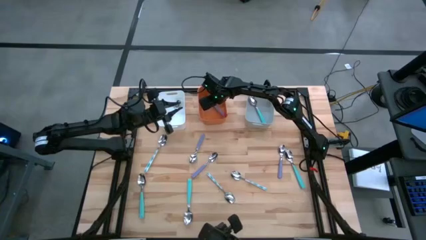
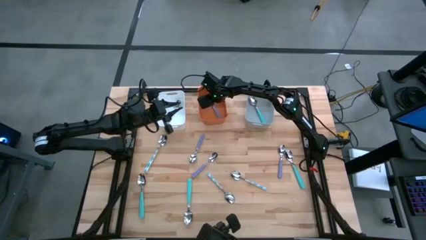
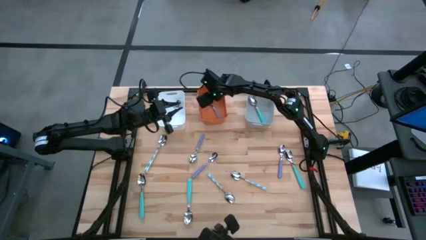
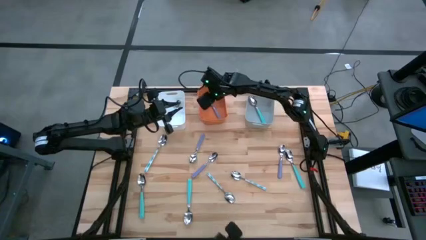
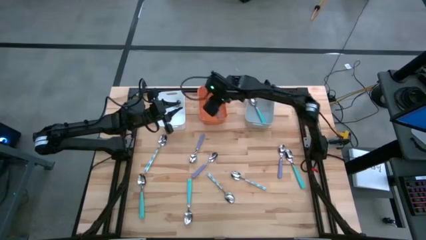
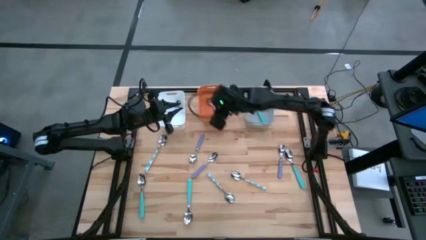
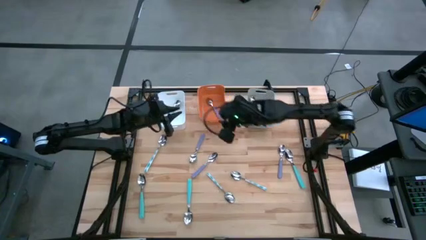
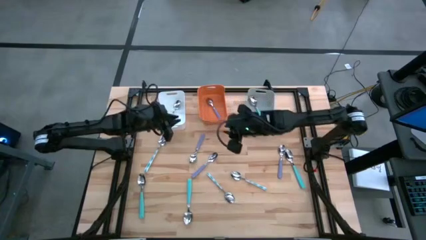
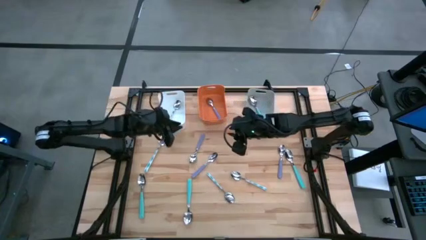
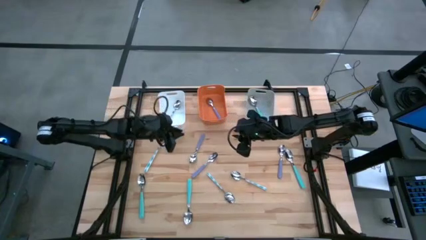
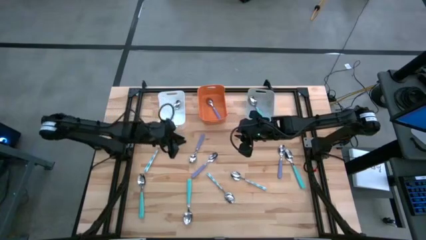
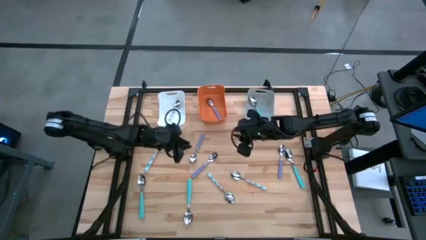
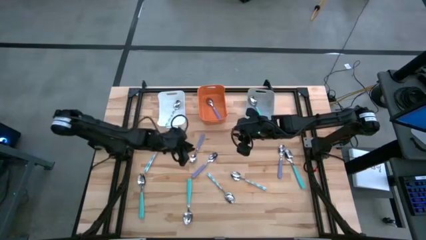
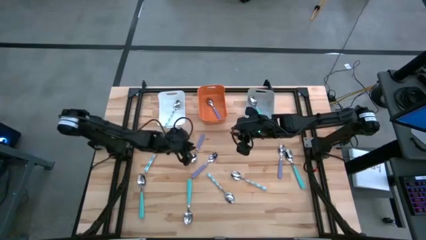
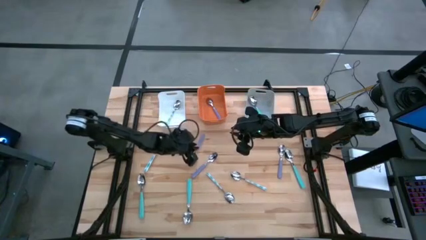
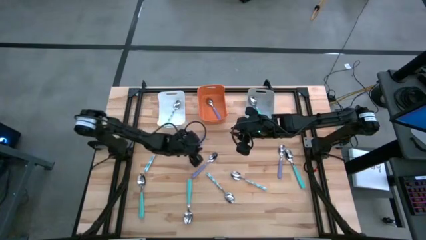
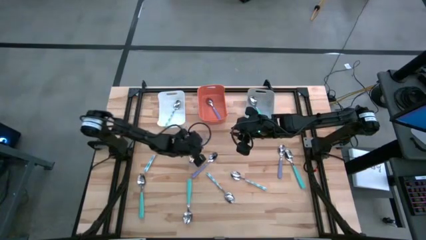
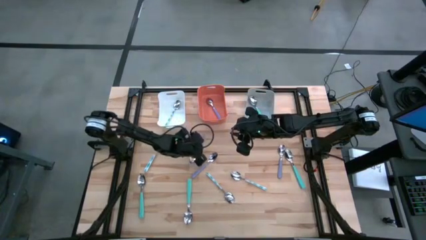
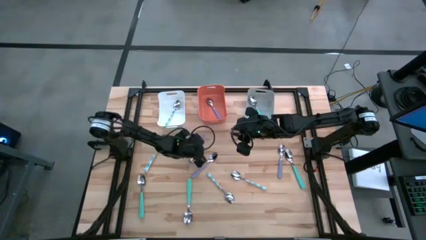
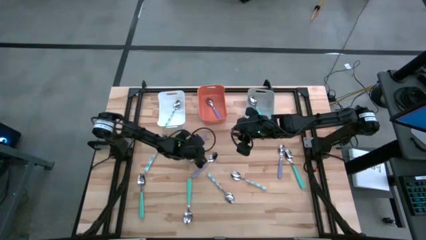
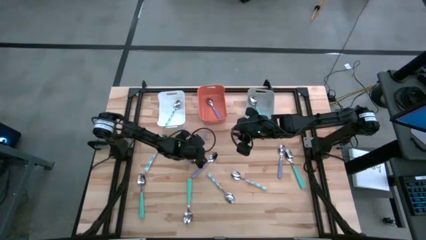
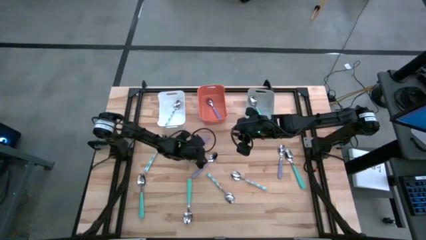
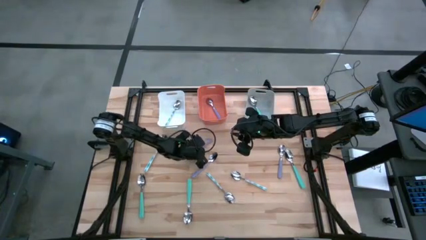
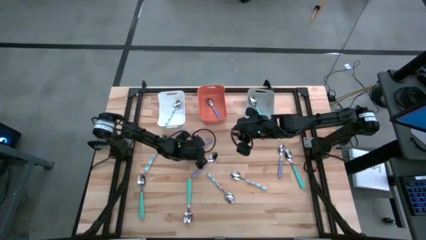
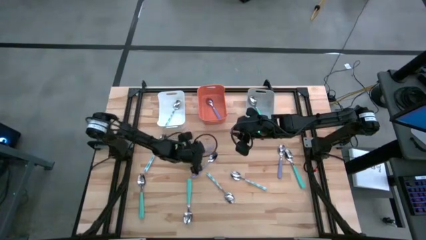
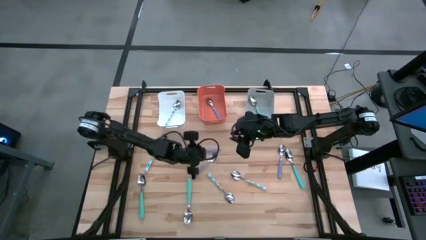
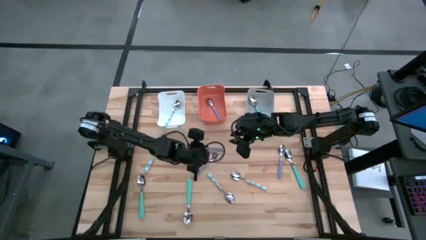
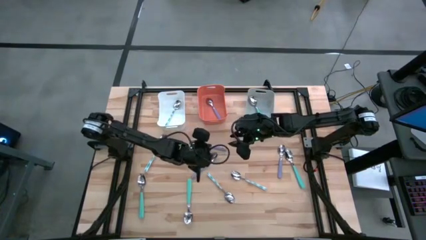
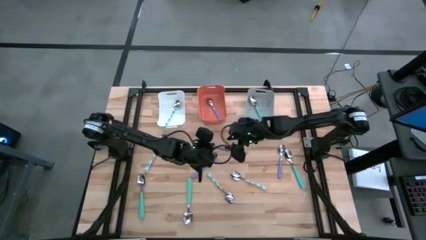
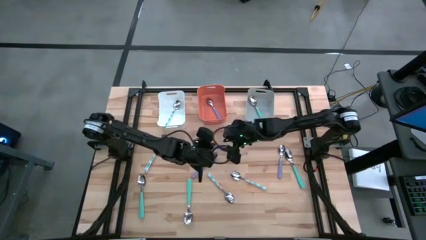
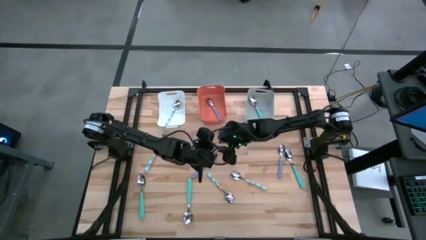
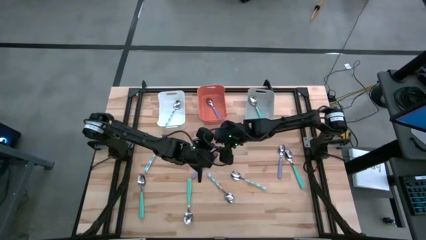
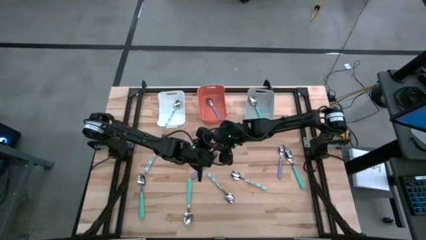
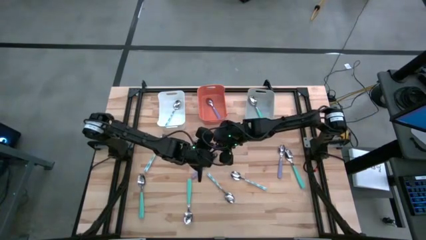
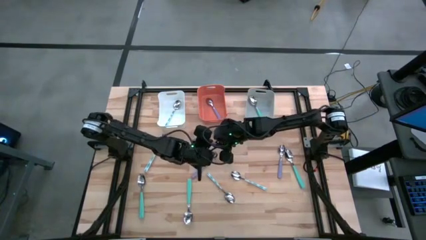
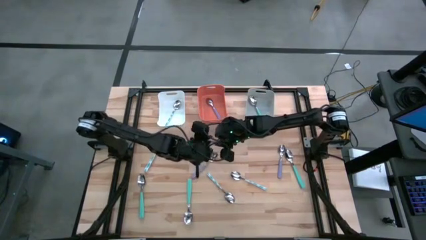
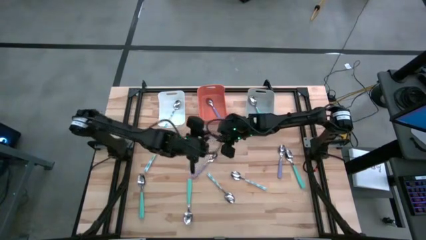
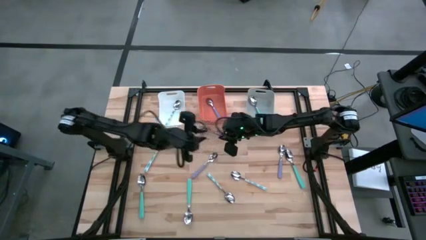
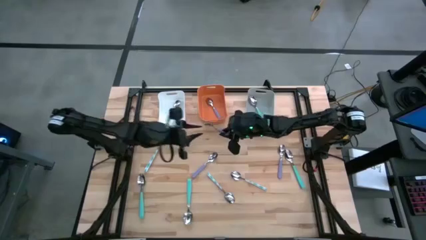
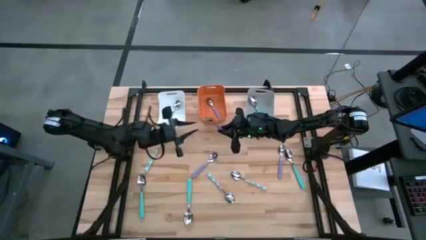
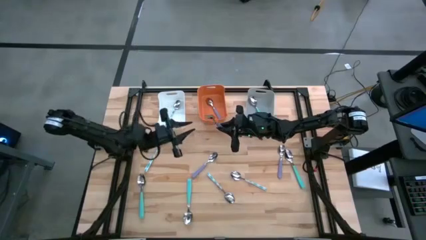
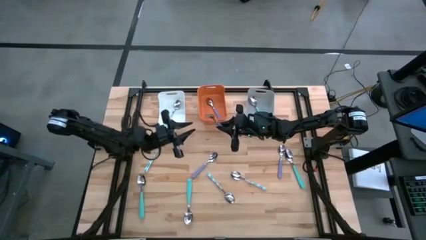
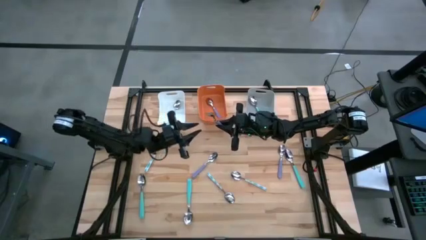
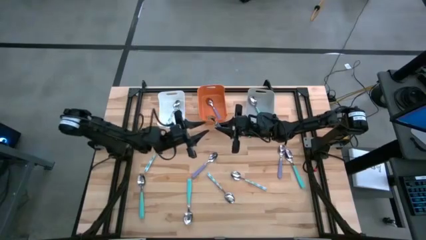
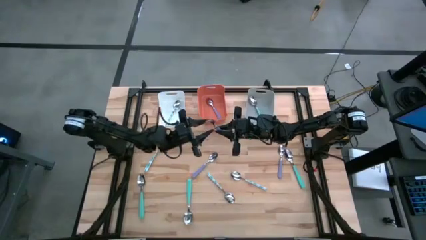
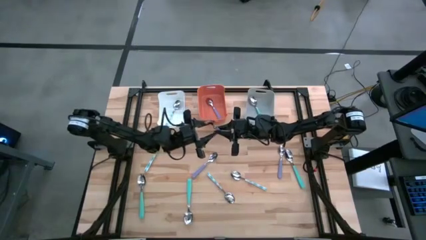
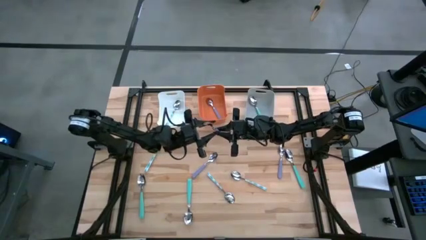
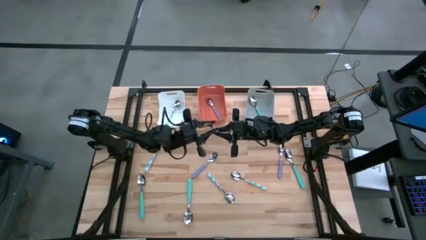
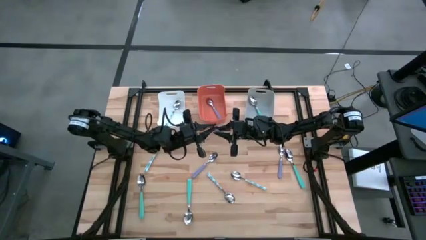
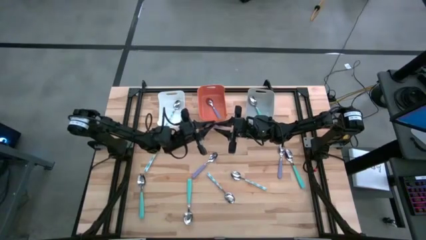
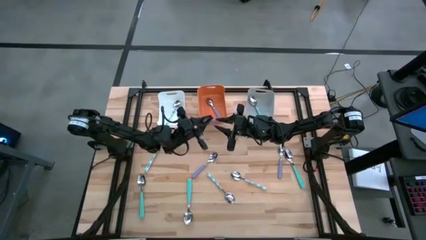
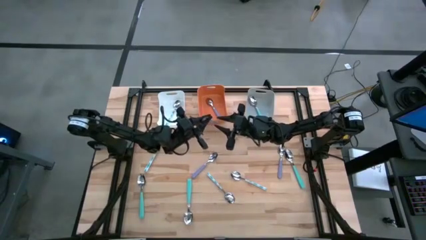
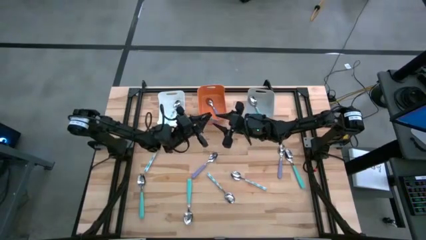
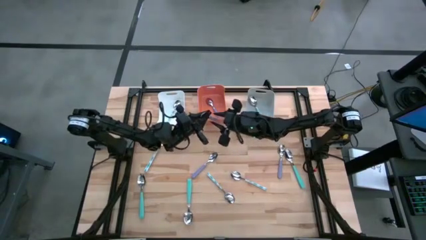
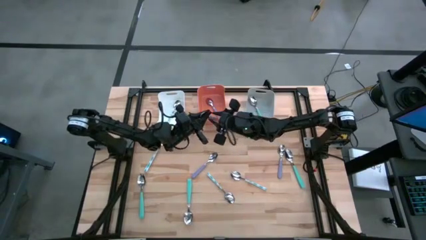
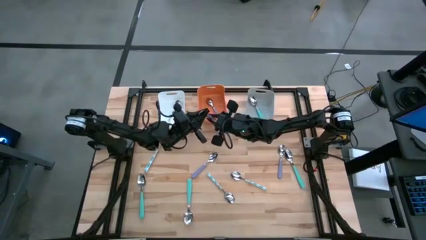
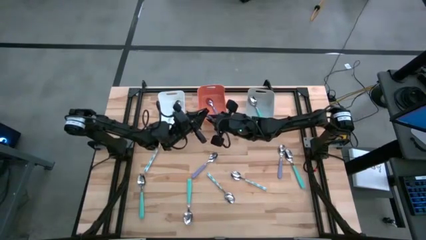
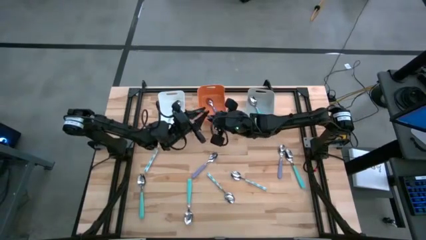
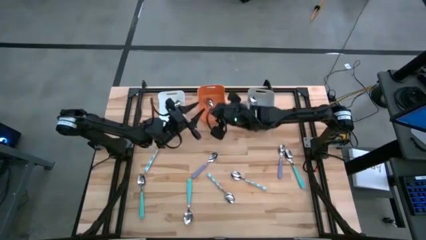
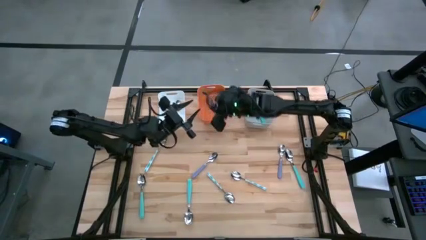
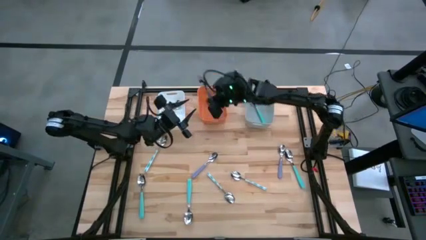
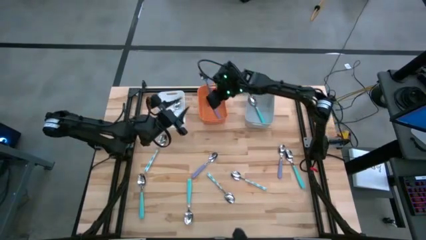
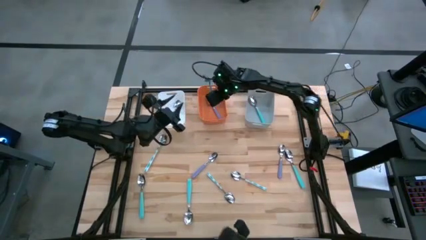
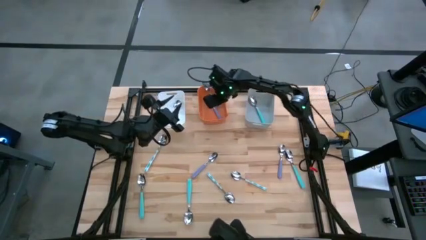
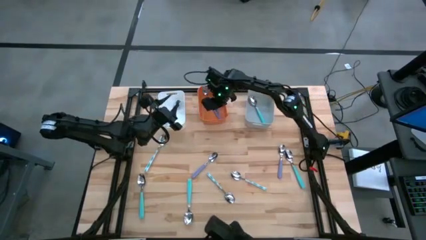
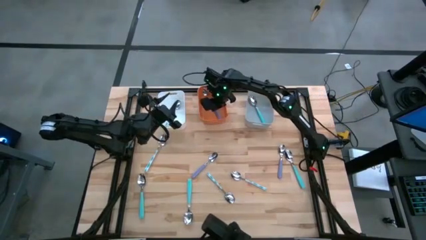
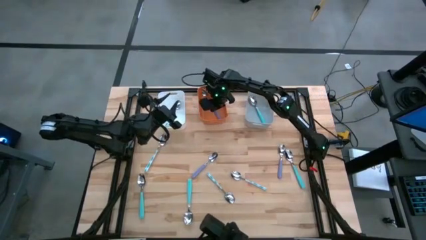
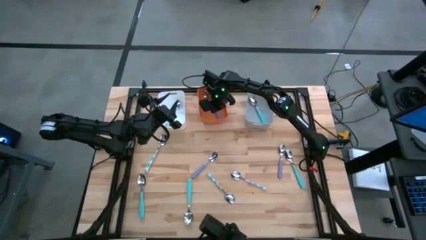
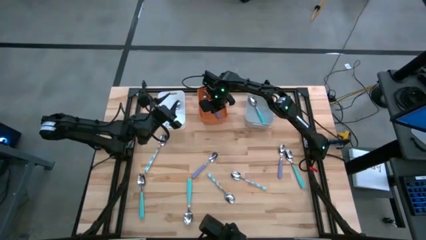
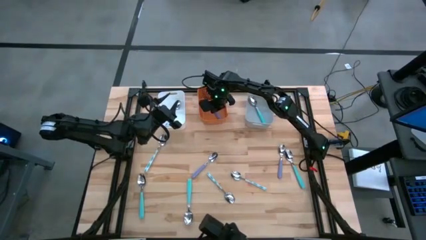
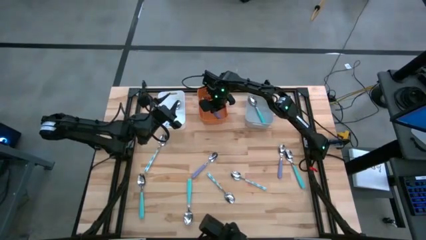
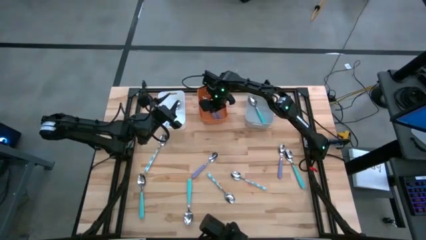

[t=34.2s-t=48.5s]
Task: Sort silverware by color (type)
Put the purple spoon into the orange bin
